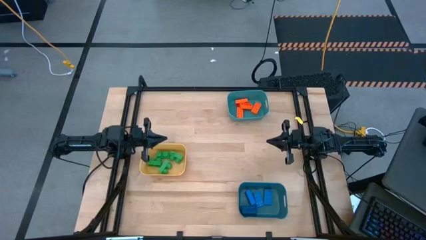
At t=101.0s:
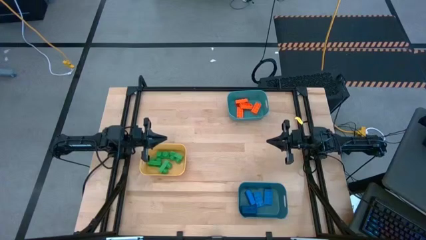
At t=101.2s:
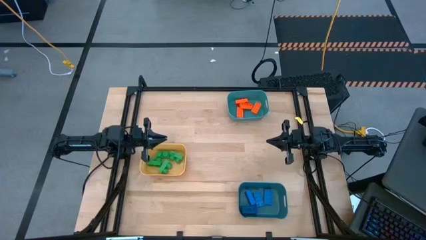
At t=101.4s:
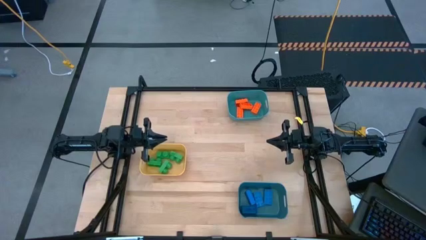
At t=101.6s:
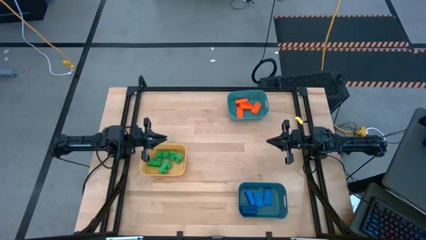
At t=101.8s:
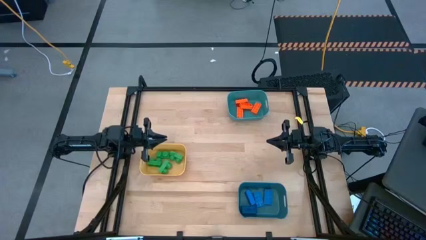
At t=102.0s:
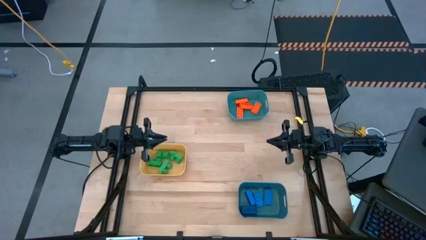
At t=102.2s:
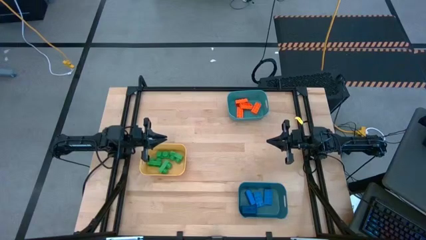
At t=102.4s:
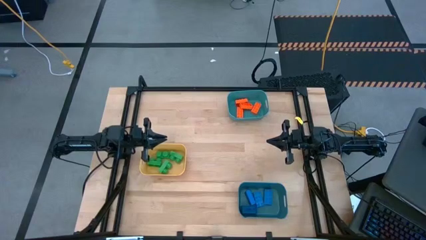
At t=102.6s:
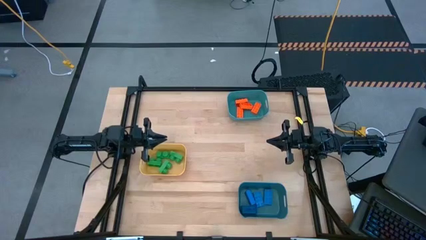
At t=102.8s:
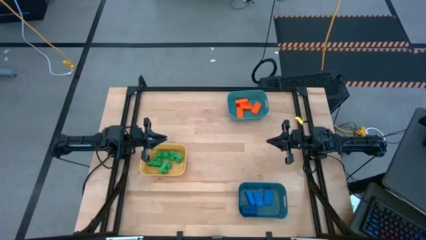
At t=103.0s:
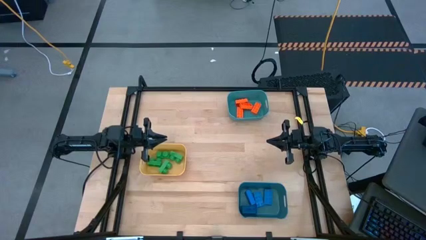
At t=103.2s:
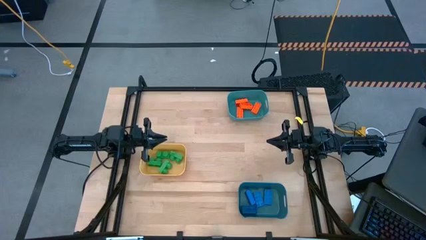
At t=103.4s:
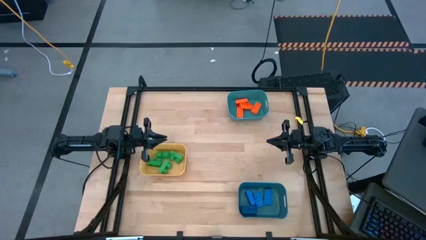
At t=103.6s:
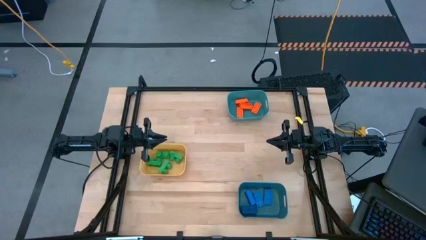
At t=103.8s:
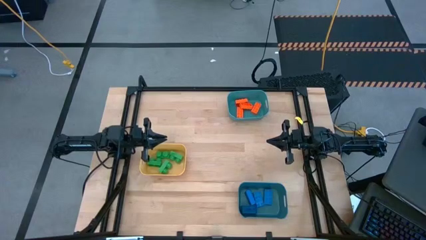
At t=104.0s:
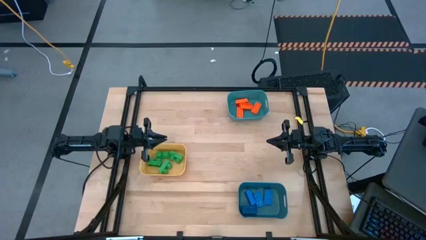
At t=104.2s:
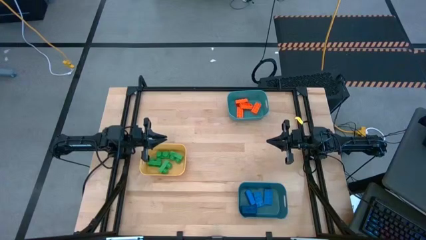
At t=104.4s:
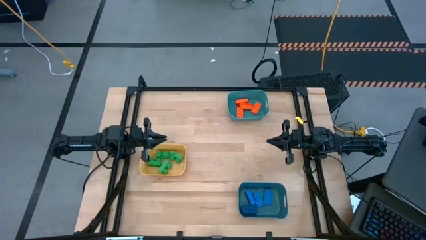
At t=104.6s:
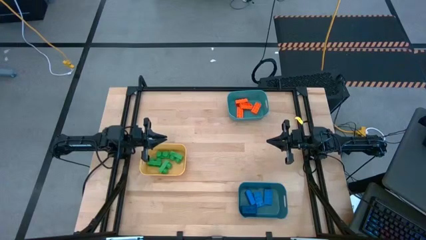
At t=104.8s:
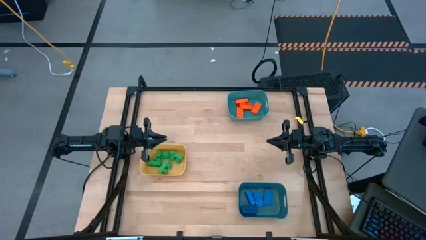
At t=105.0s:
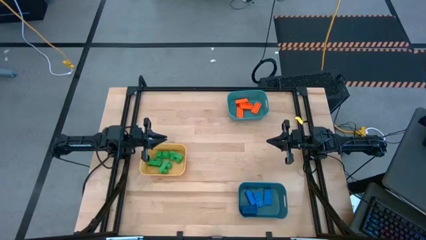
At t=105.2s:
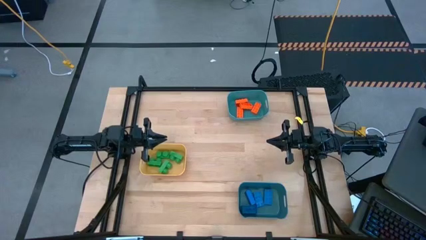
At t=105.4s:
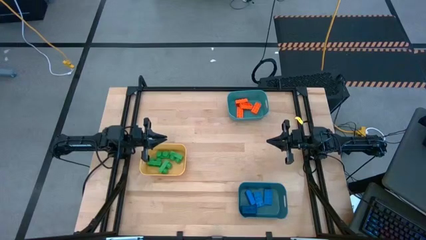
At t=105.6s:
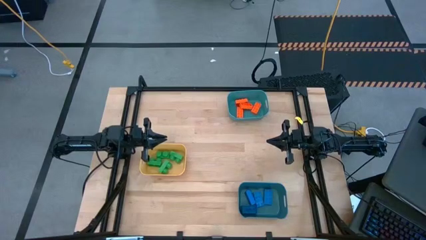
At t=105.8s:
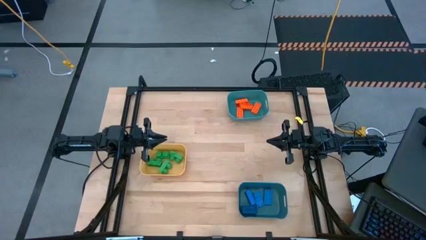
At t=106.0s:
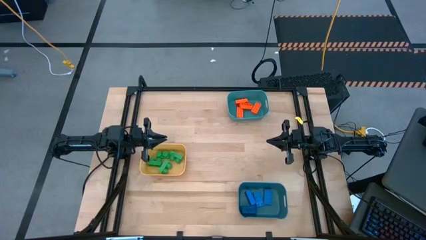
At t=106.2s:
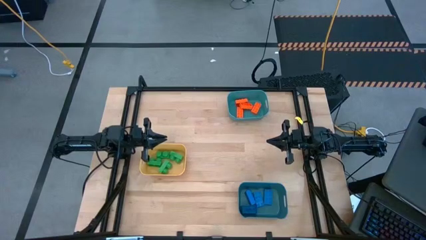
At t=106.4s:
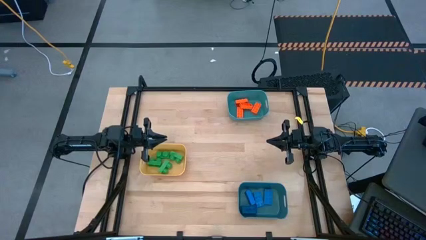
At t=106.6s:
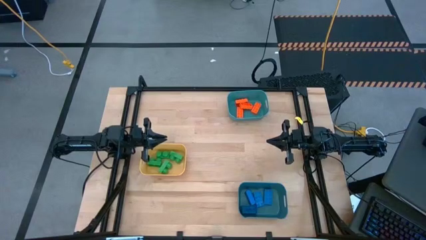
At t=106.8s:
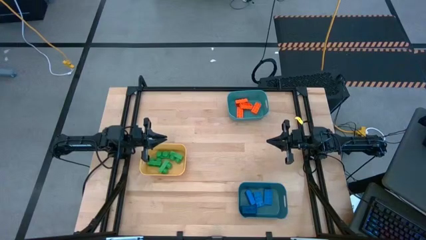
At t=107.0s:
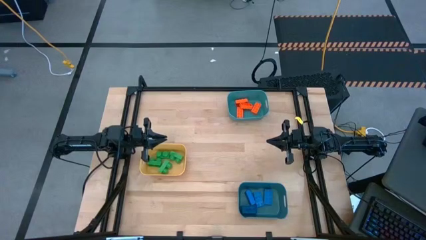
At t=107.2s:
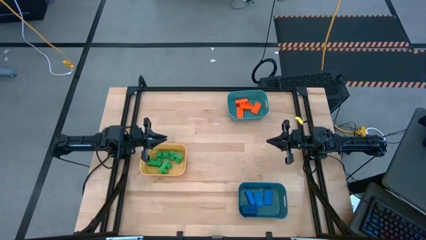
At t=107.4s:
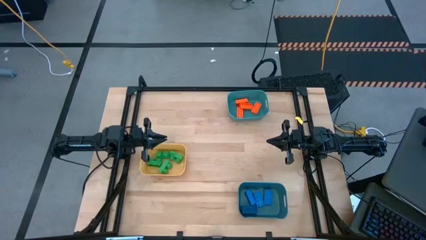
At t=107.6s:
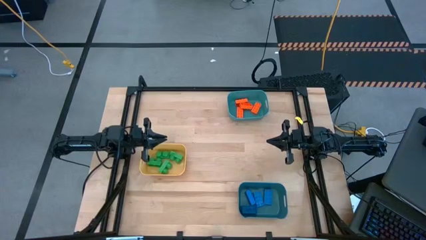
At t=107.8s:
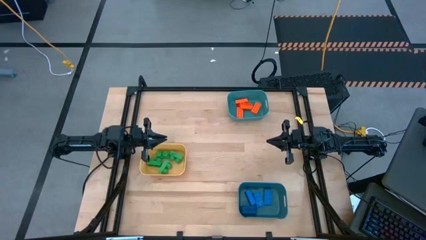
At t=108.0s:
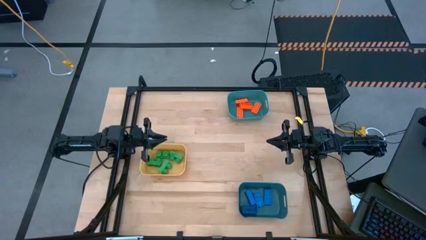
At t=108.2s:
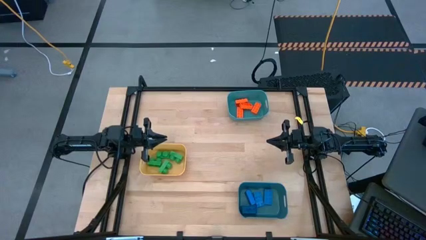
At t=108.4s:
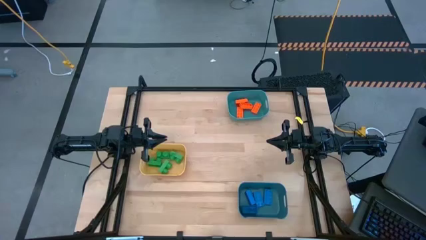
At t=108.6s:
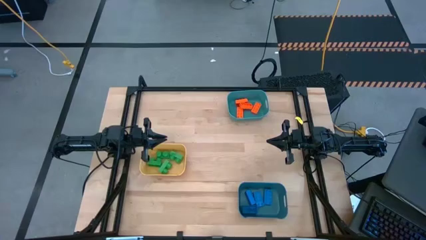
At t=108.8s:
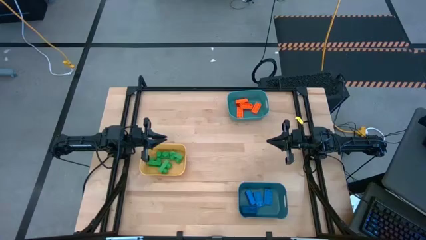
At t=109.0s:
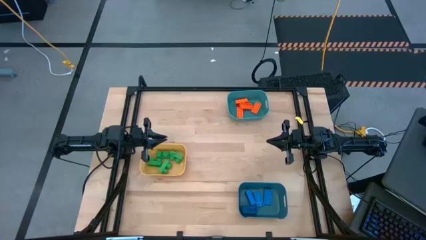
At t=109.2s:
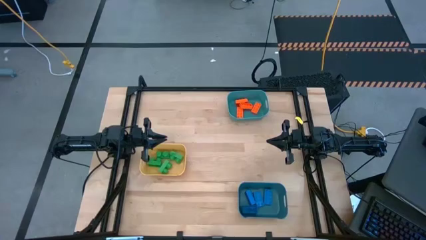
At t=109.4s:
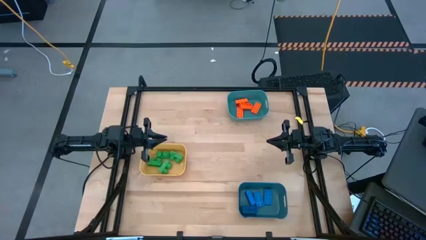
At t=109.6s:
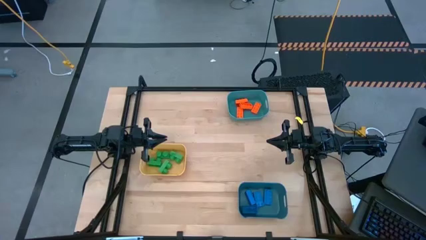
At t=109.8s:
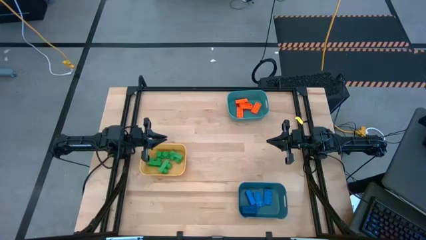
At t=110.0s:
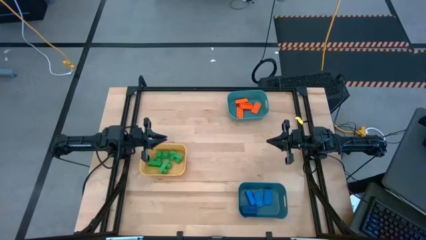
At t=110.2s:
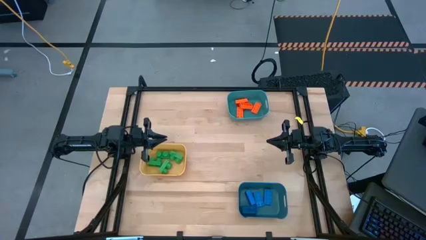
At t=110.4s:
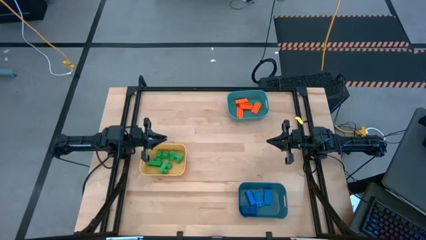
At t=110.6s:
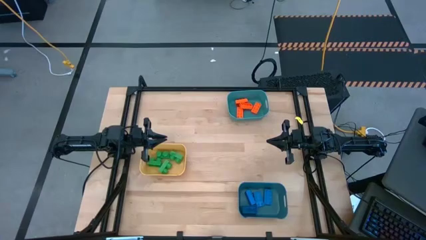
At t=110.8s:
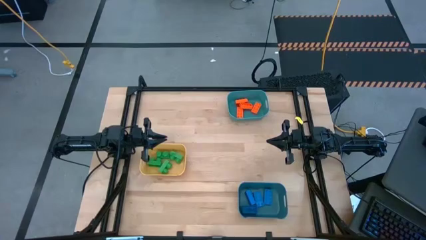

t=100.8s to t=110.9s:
Task: Sort & place blocks by color
Return to Home Position

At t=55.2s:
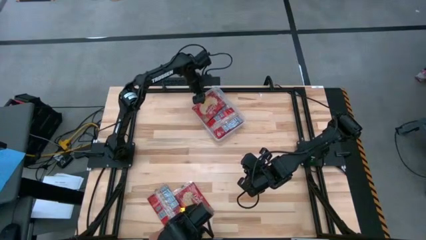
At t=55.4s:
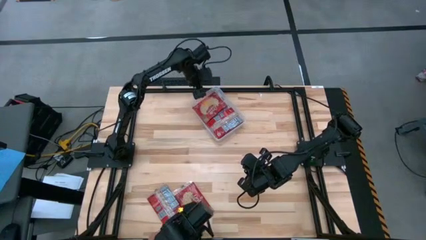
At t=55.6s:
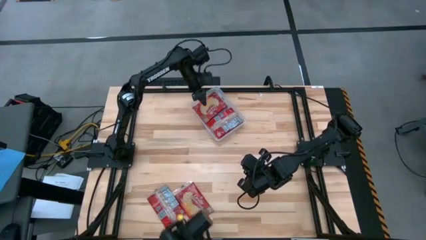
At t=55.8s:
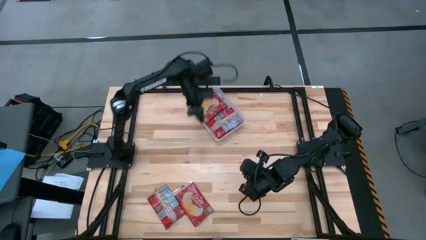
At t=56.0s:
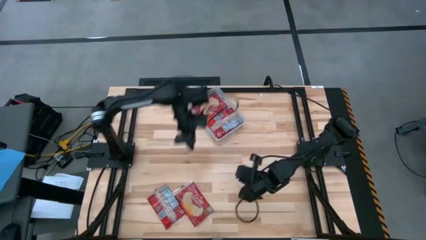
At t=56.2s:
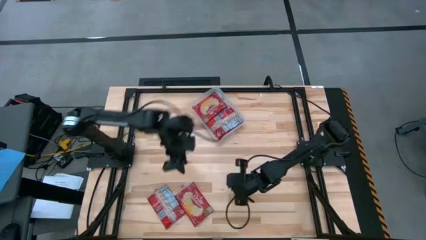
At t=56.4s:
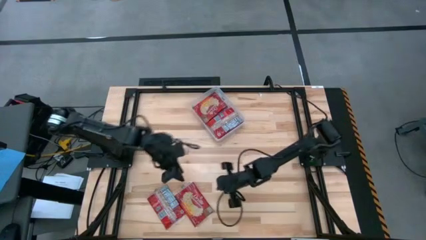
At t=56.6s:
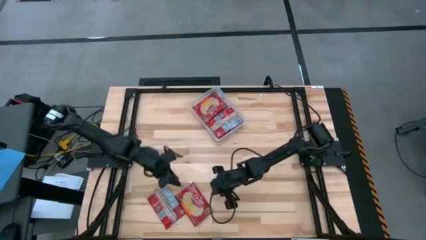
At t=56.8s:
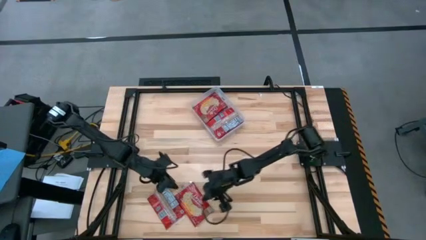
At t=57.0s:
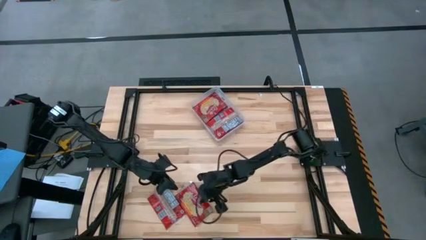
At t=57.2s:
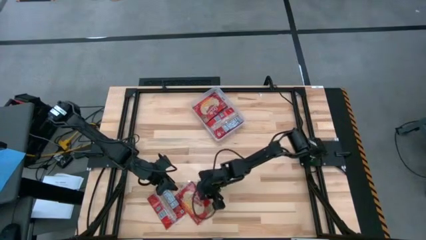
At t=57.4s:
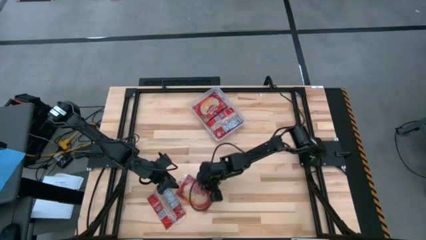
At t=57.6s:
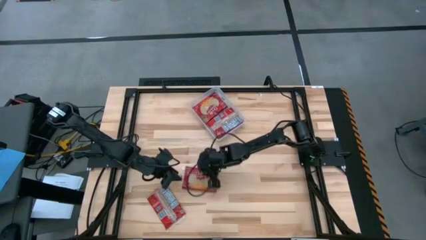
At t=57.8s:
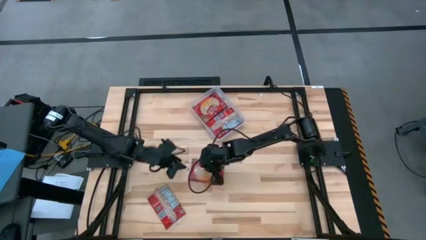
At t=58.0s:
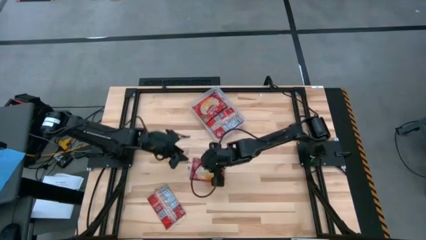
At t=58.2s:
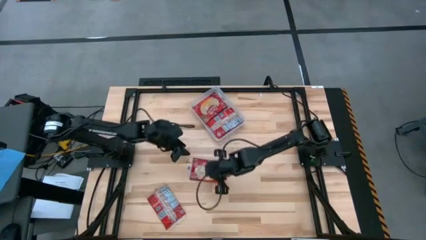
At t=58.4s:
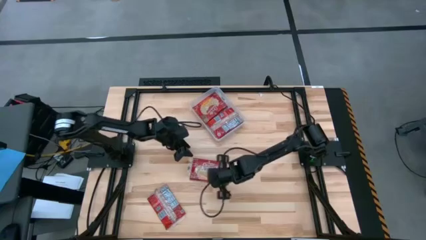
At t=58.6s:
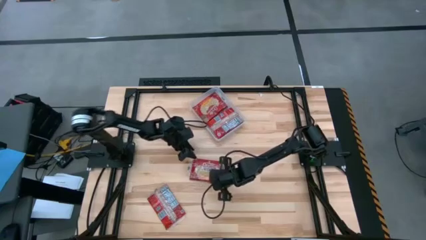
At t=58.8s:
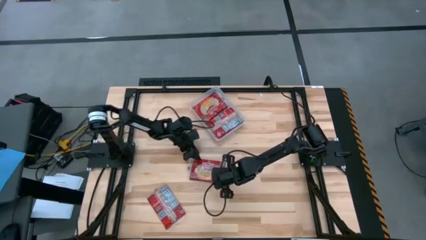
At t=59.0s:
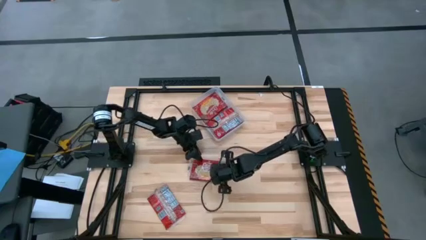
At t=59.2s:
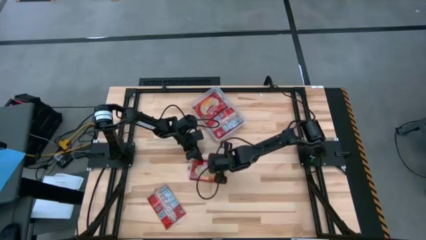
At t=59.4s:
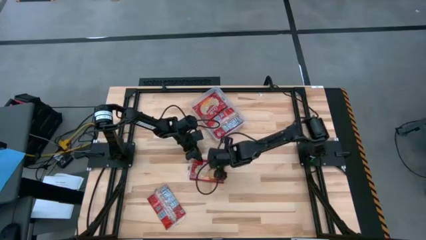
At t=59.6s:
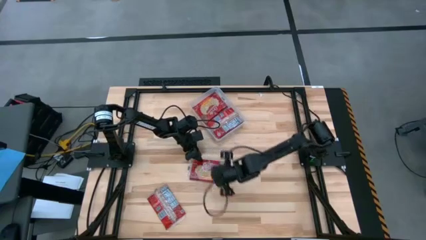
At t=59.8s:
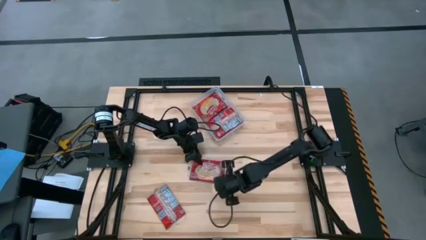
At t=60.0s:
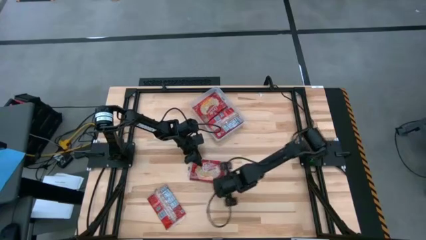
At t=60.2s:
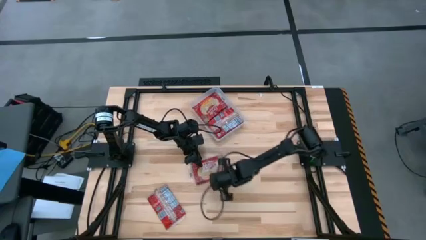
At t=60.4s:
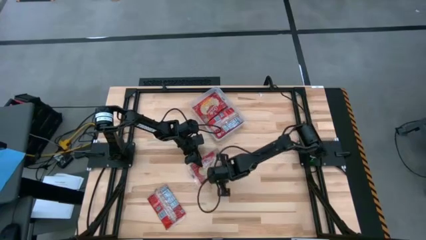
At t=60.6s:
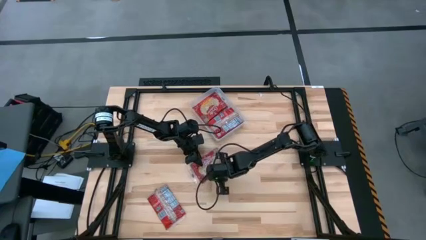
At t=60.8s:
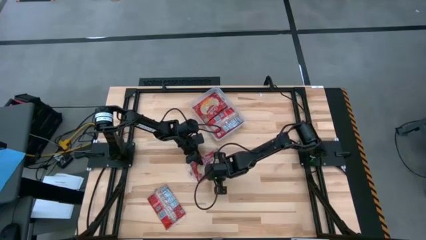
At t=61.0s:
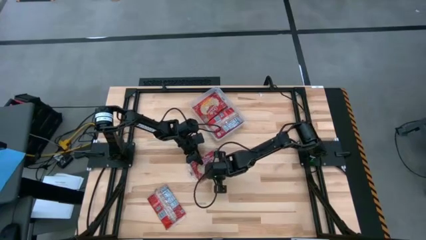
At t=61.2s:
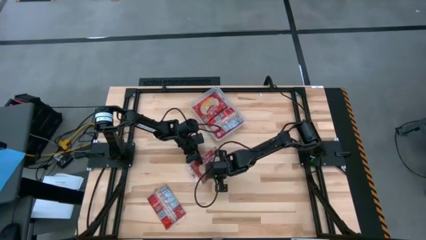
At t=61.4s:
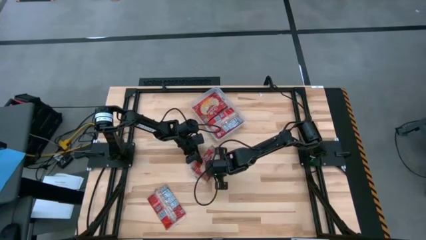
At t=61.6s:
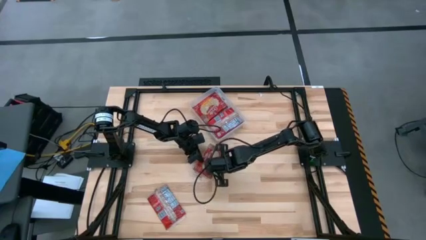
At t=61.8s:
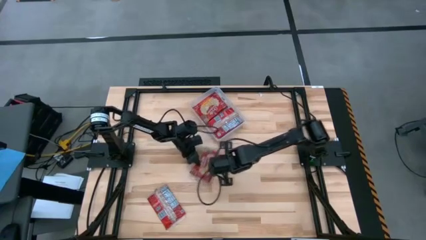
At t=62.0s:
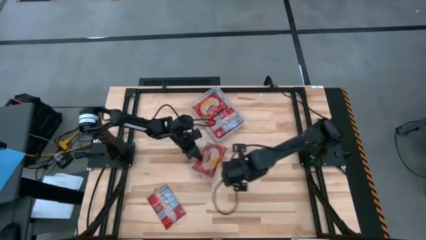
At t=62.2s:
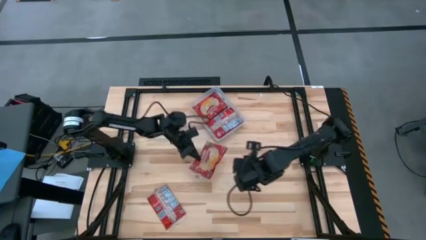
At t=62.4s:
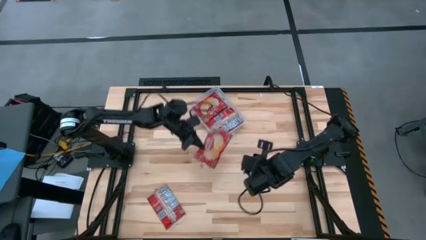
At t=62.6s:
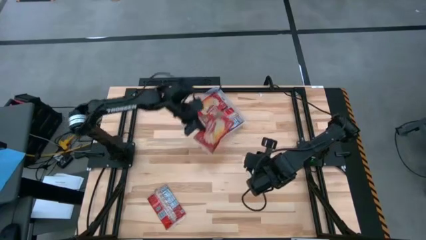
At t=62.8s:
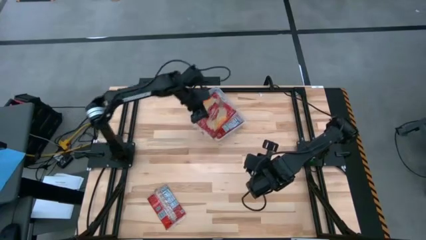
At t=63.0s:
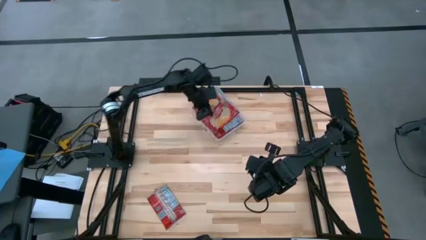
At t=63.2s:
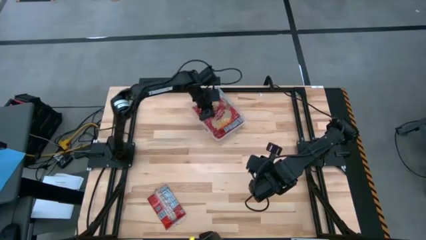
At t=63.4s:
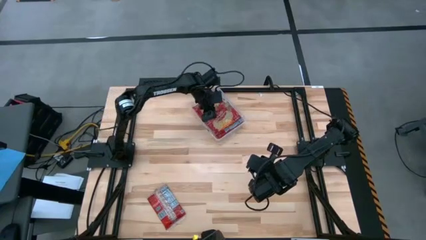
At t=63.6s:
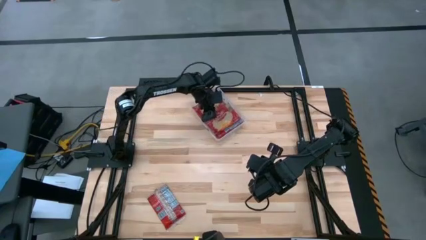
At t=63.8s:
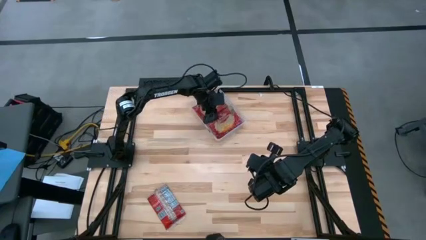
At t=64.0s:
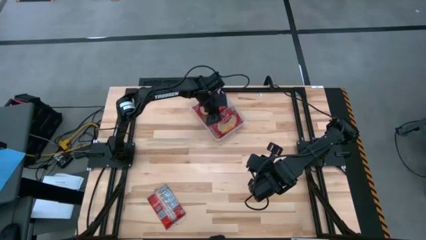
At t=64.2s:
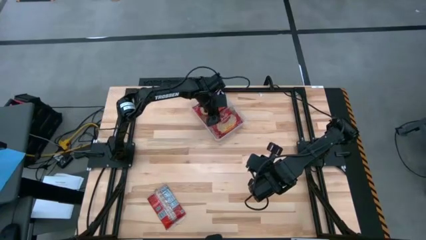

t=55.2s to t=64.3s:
Task: Sort popcorn bags into baskets
Put the red popcorn bag into the white bin
